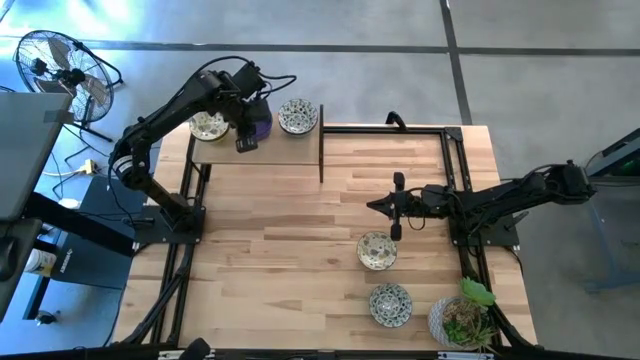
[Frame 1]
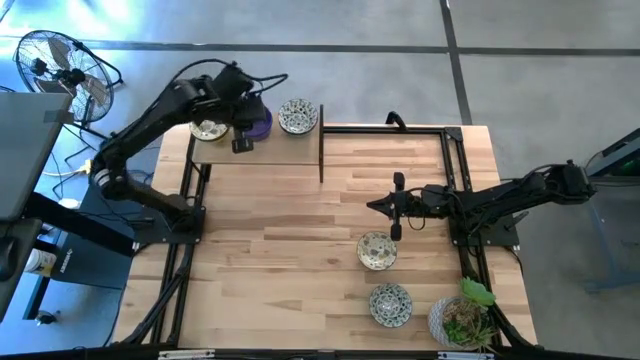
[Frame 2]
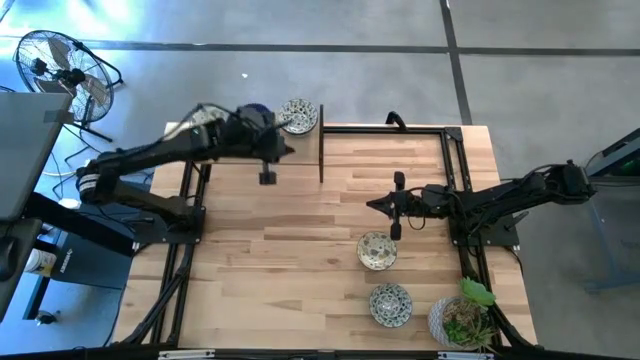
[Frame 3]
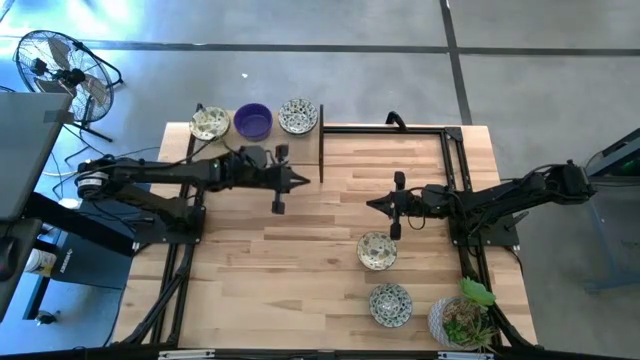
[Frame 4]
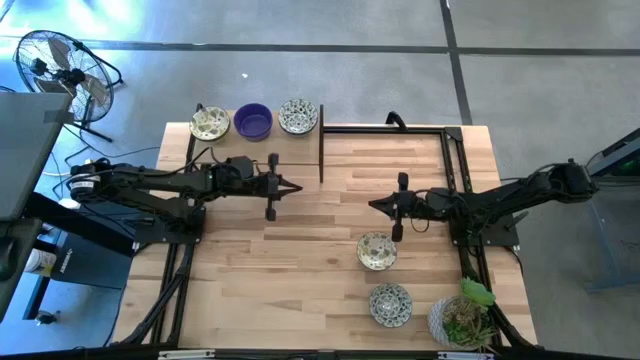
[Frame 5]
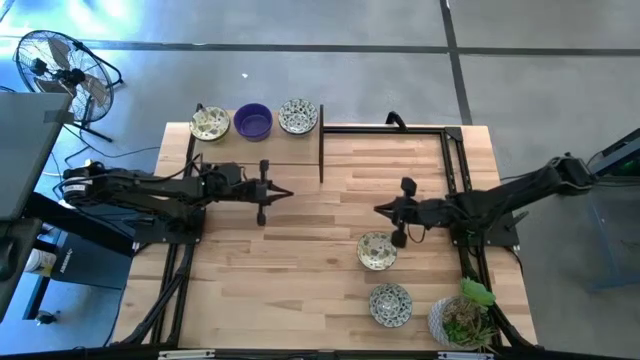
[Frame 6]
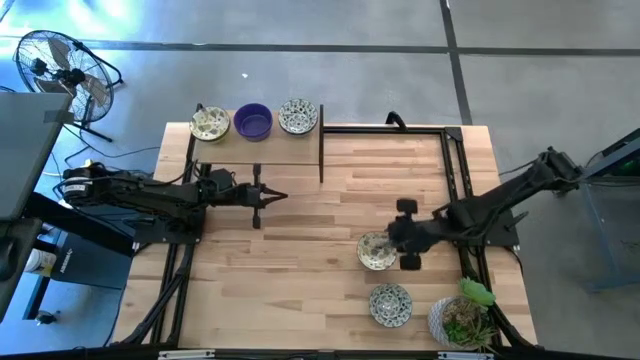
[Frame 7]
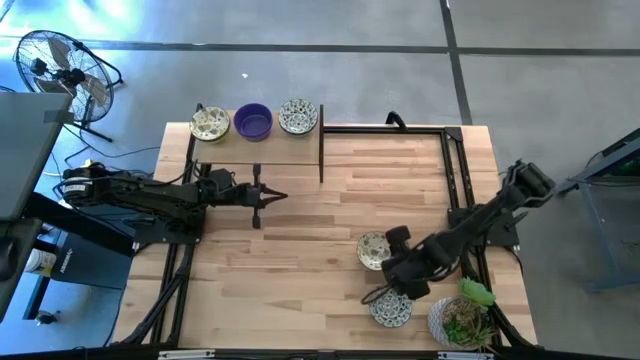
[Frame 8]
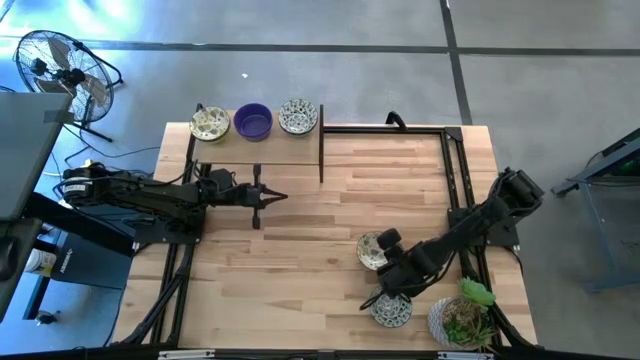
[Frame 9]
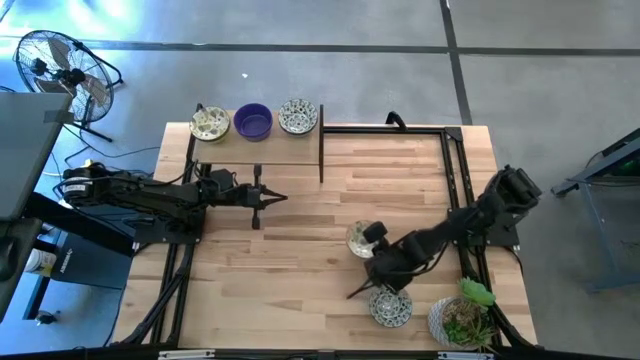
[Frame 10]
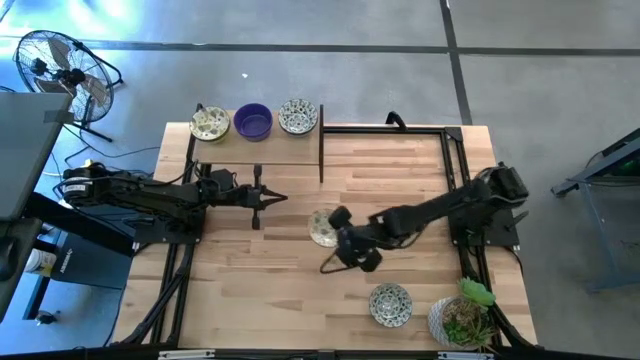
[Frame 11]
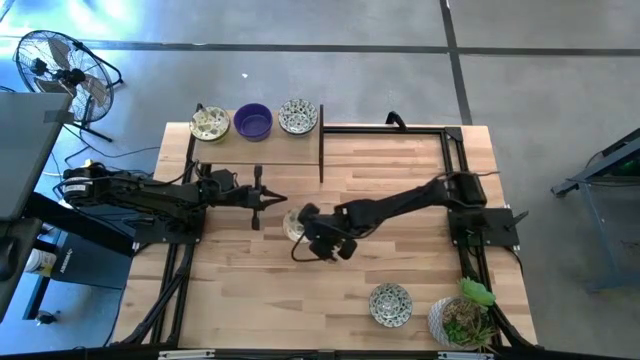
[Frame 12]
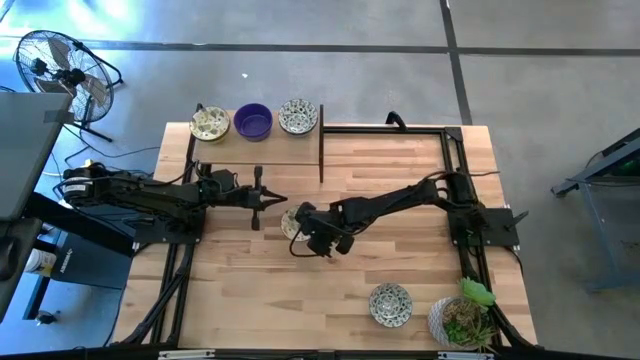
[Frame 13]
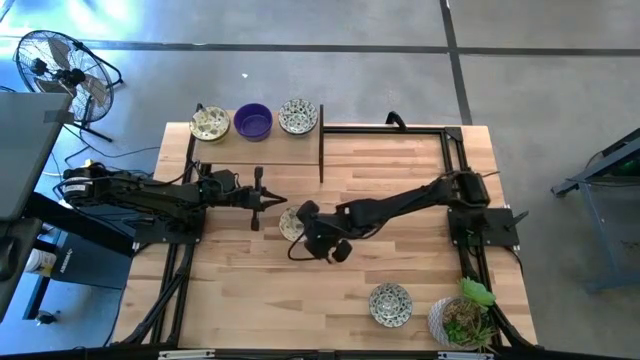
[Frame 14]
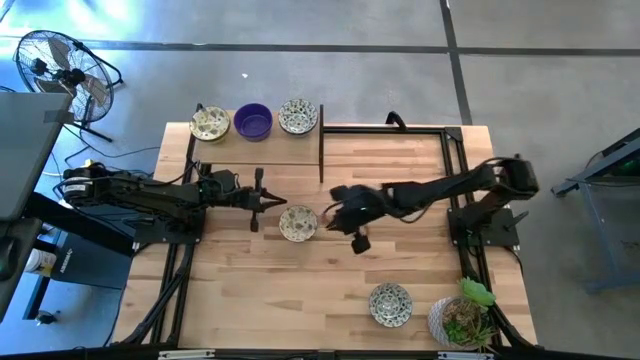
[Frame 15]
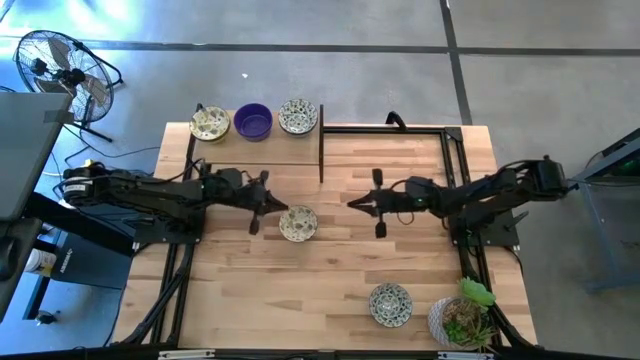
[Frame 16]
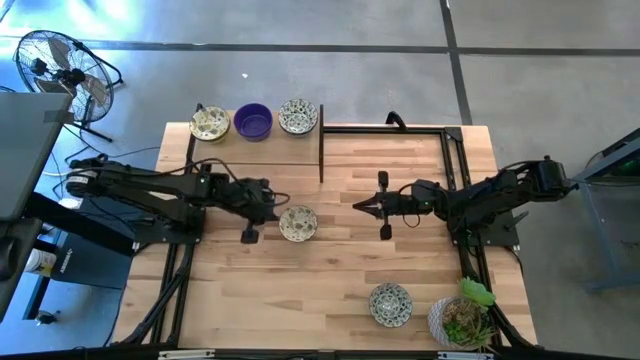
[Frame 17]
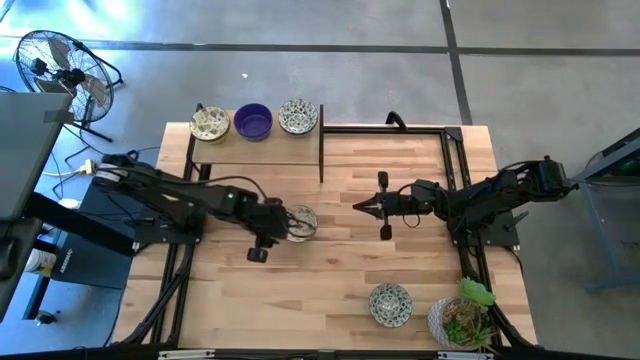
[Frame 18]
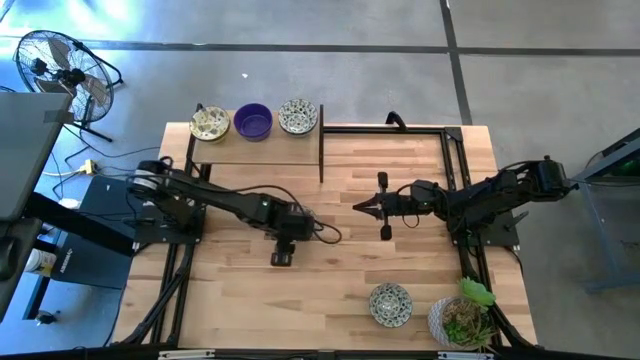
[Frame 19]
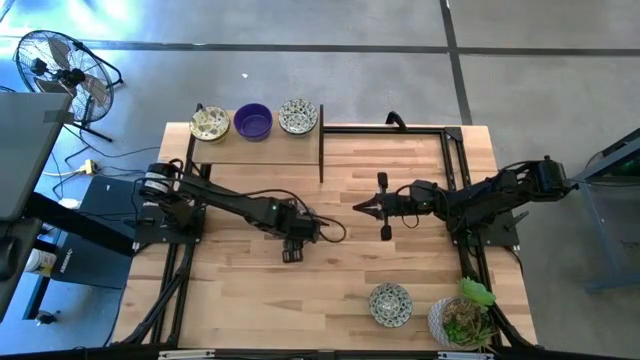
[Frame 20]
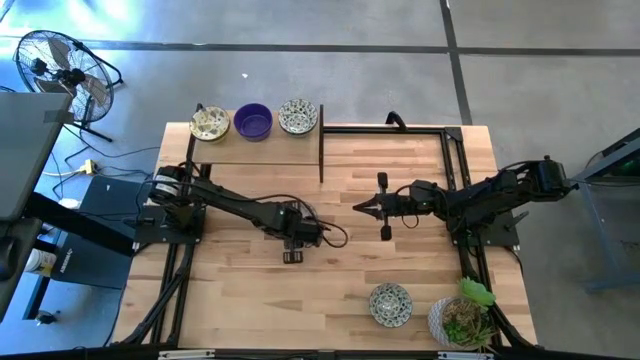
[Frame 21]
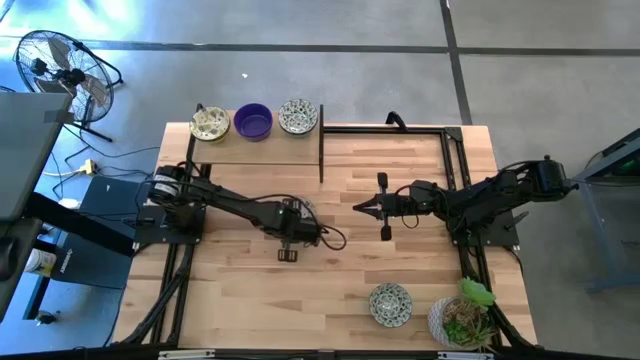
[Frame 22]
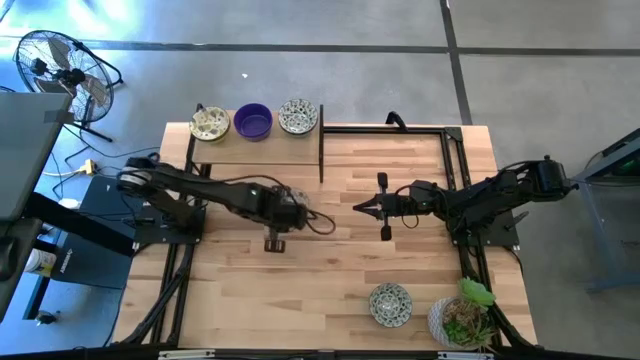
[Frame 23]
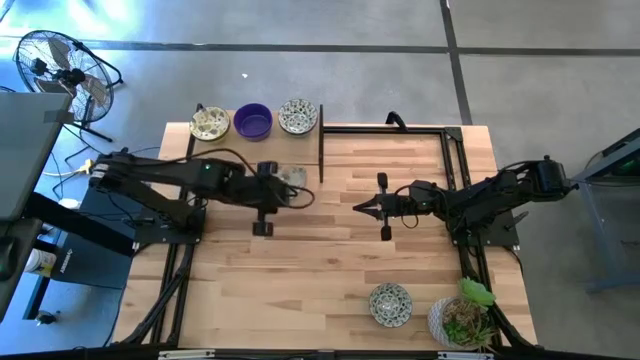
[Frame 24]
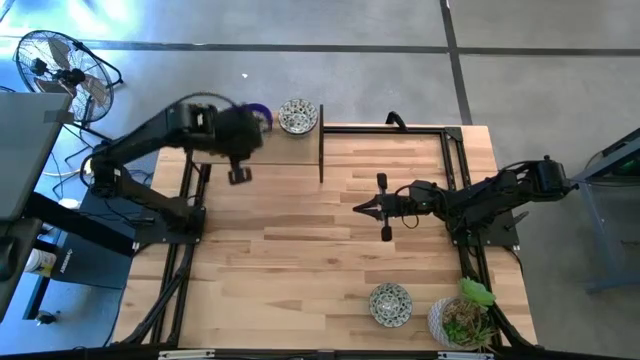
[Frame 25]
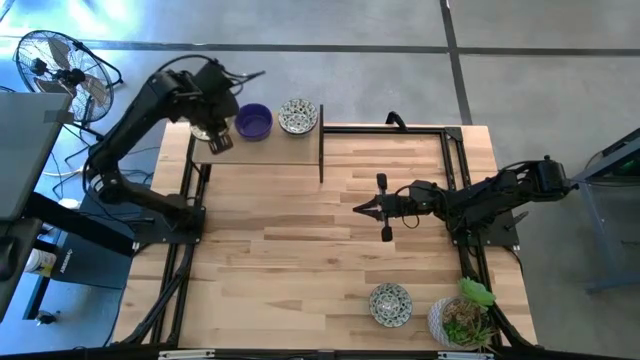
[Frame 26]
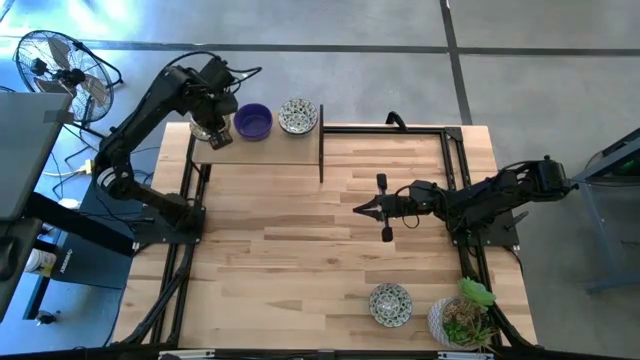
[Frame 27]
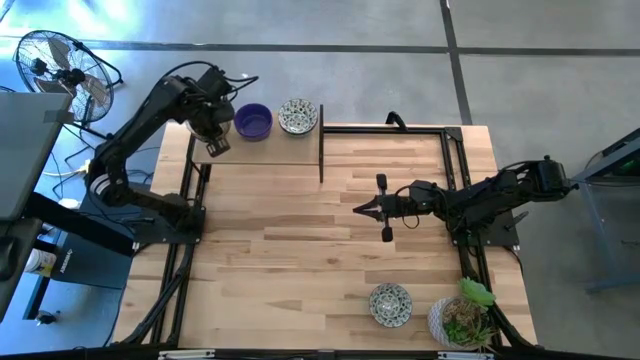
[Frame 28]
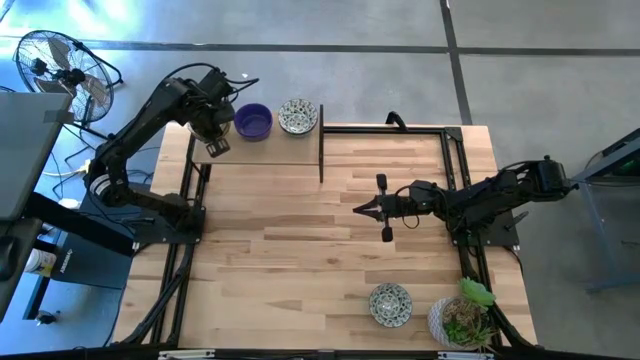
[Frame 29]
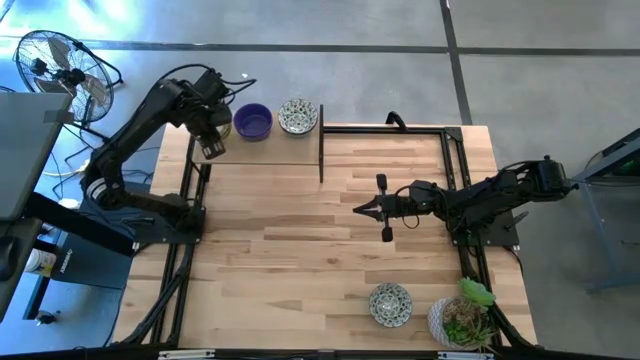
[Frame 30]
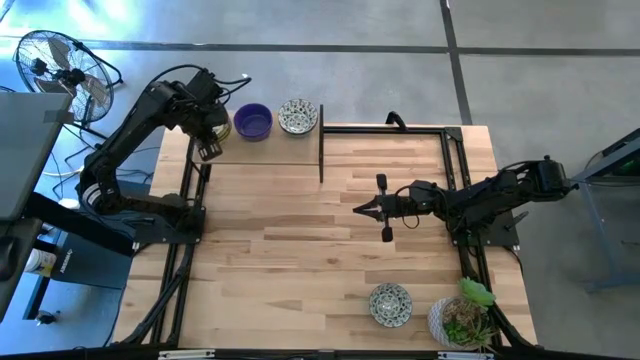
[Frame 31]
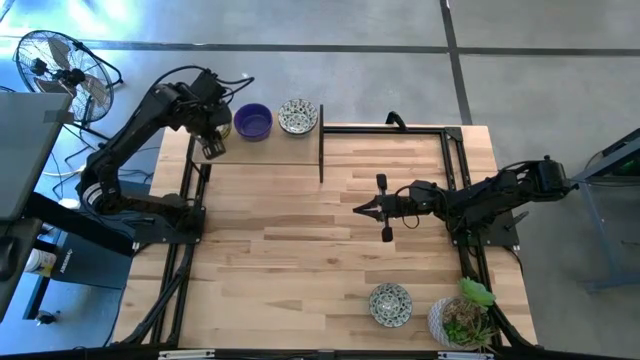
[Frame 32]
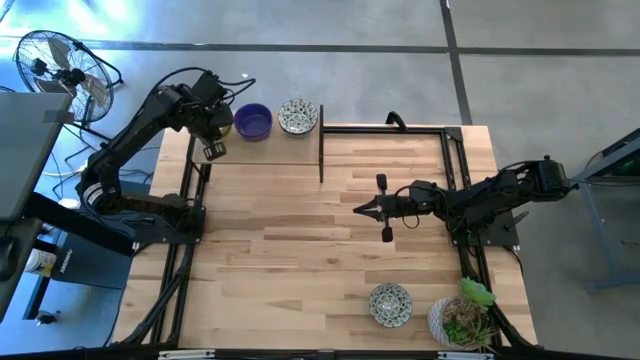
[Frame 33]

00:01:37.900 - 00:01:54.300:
Task: Pick & Place Mini bowls
Stack the yellow and white patterned bowl on the stacked yellow and white patterned bowl on the shelf

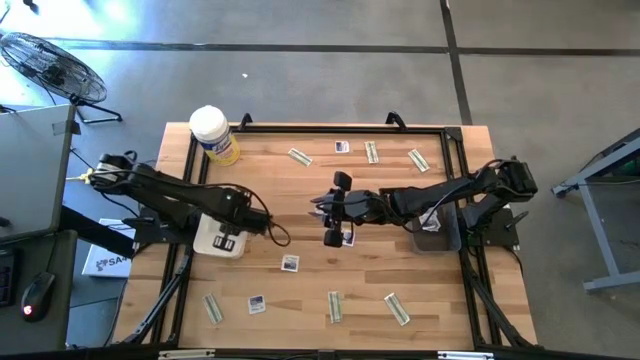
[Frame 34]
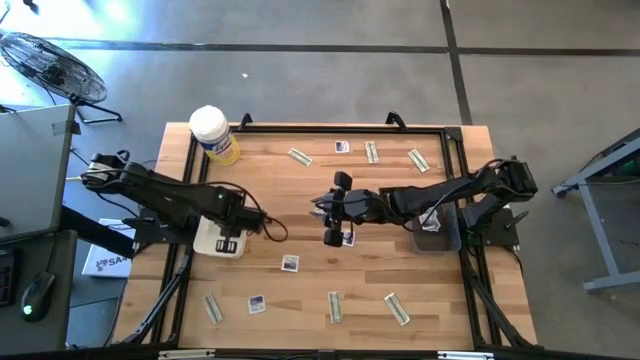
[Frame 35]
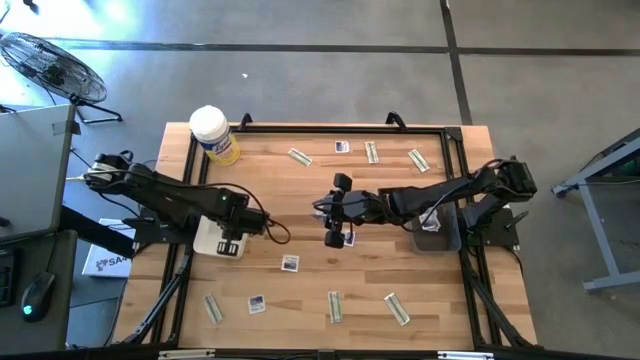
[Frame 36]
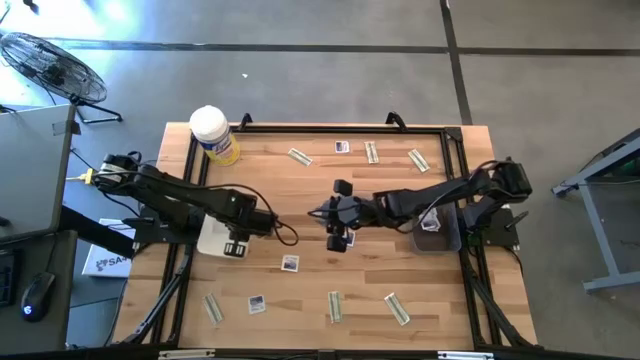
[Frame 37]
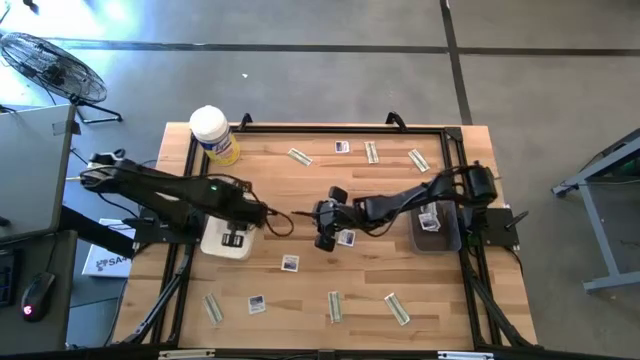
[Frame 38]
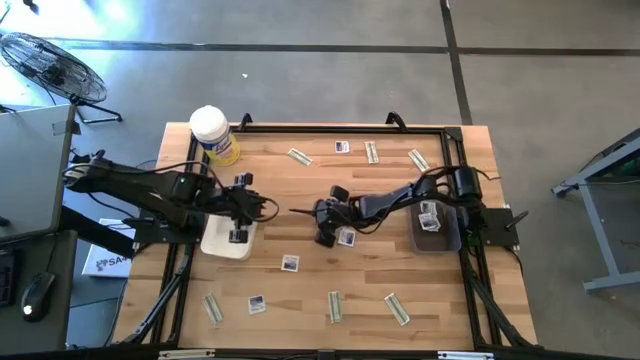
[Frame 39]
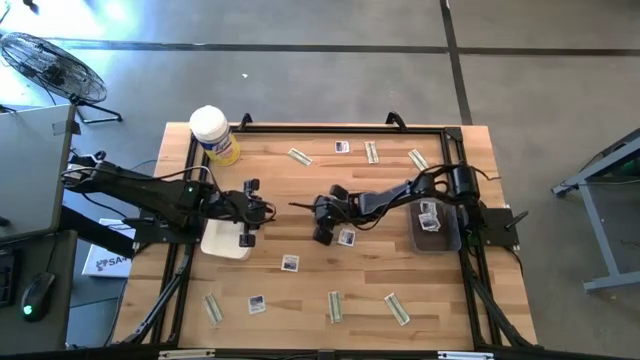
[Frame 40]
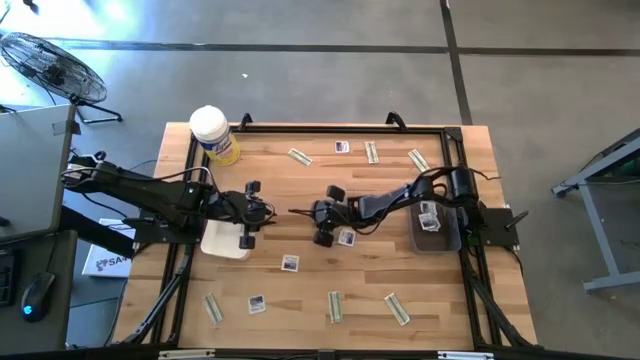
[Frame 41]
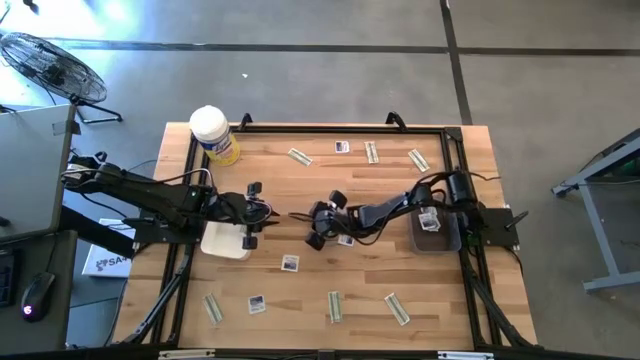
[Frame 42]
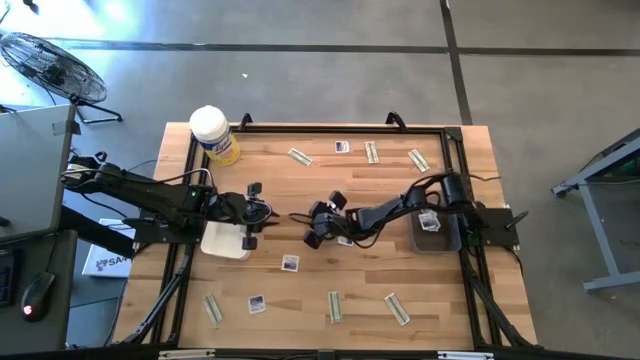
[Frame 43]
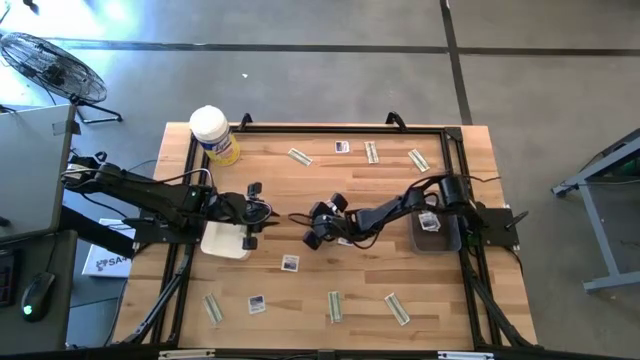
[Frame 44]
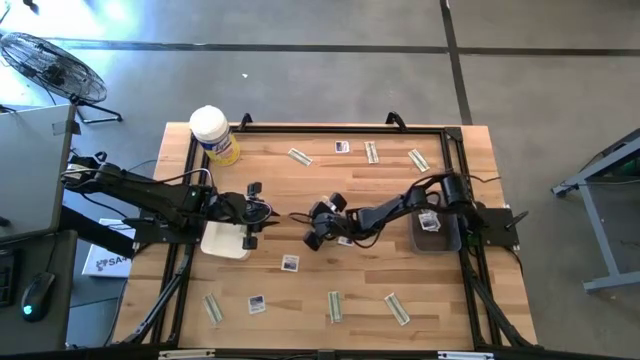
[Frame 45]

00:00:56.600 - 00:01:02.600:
Task: Pick & Place First Aid Supplies
Put the green bandage into the white bin
